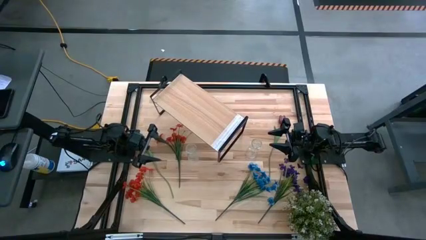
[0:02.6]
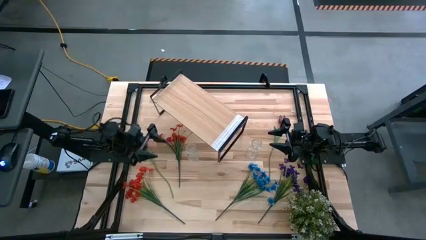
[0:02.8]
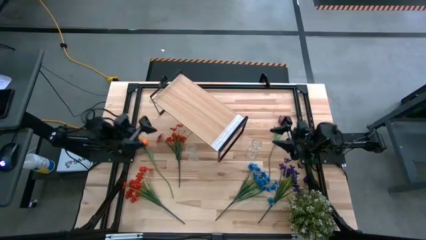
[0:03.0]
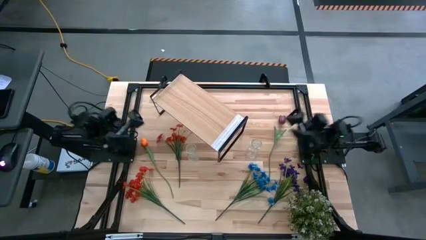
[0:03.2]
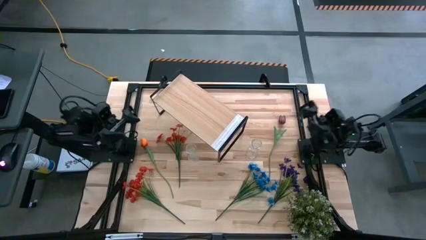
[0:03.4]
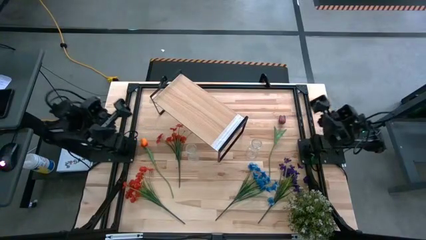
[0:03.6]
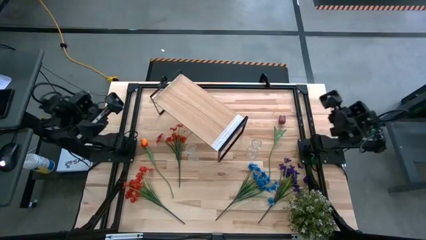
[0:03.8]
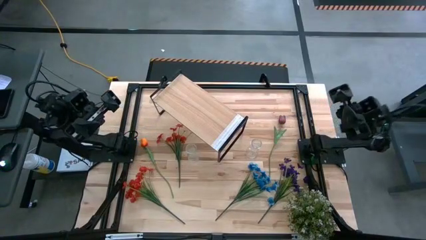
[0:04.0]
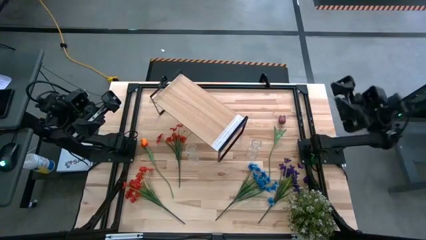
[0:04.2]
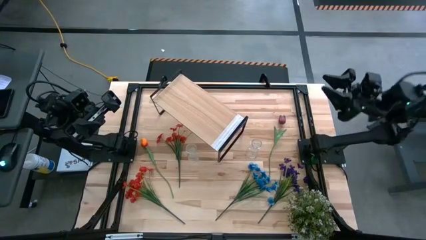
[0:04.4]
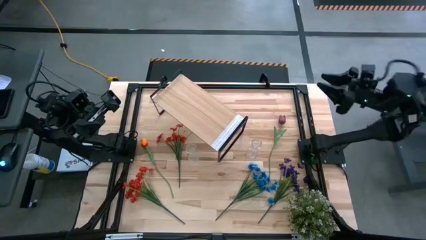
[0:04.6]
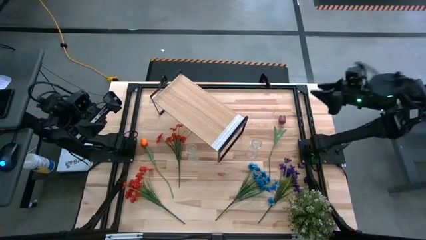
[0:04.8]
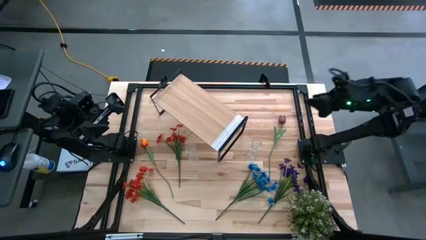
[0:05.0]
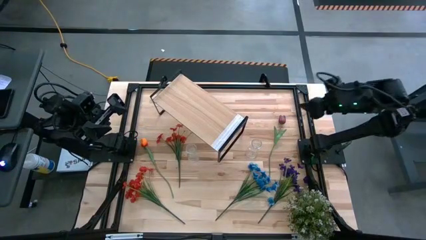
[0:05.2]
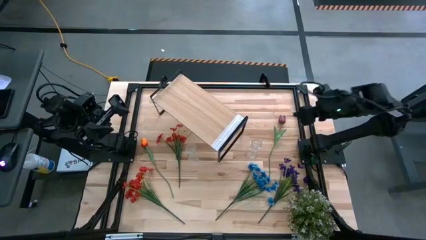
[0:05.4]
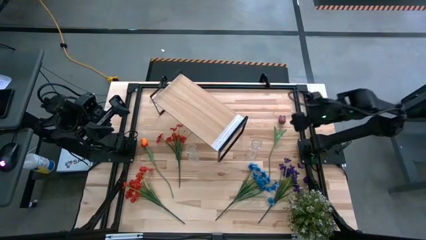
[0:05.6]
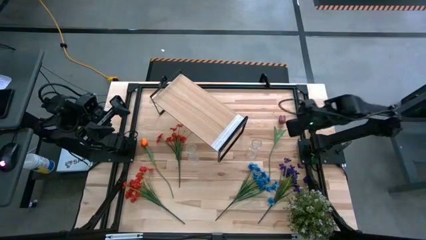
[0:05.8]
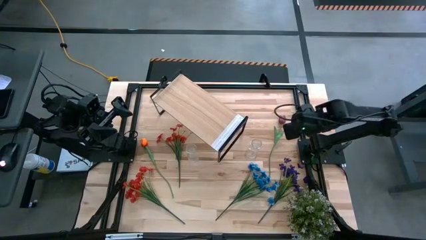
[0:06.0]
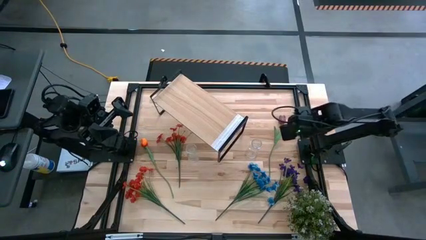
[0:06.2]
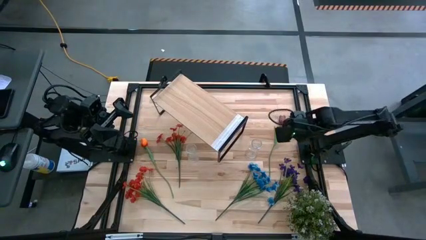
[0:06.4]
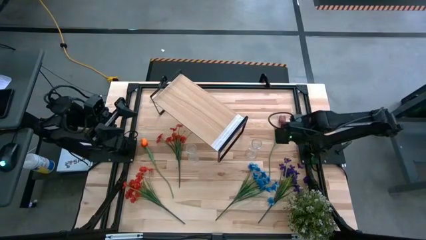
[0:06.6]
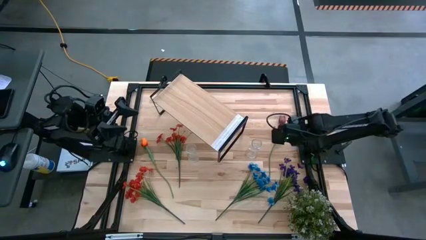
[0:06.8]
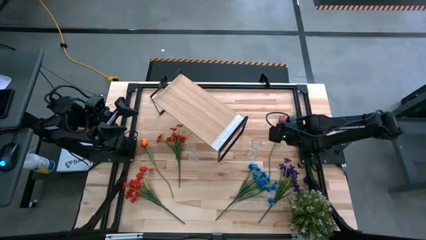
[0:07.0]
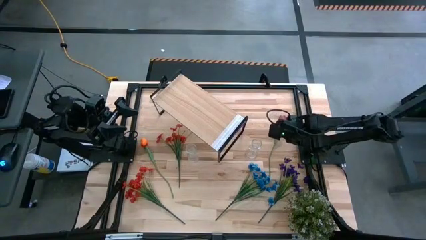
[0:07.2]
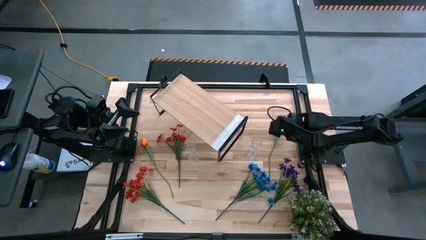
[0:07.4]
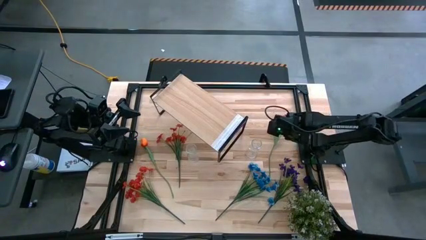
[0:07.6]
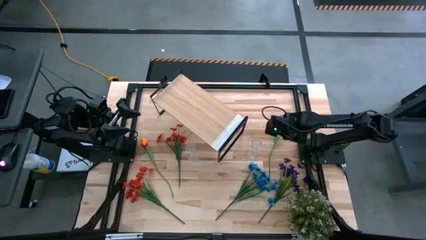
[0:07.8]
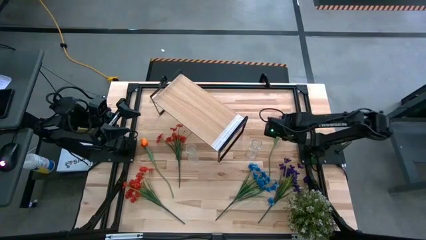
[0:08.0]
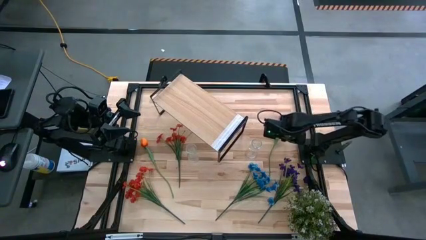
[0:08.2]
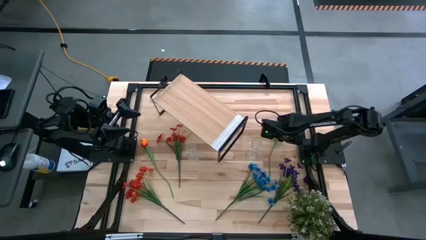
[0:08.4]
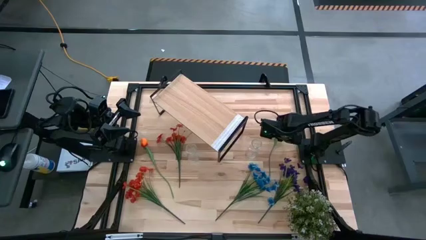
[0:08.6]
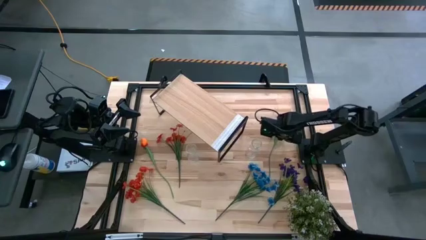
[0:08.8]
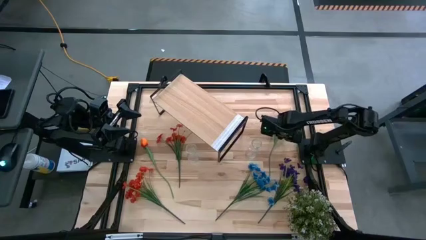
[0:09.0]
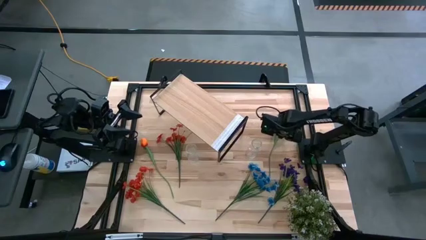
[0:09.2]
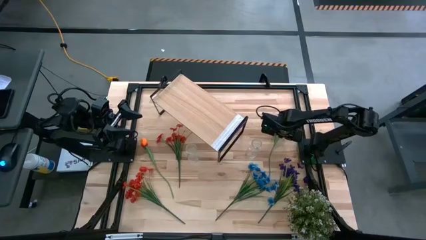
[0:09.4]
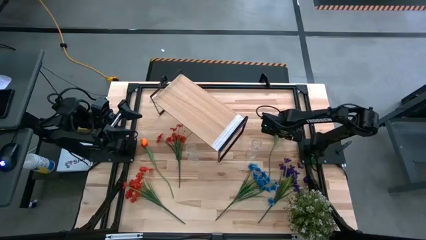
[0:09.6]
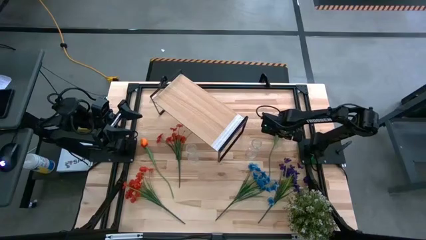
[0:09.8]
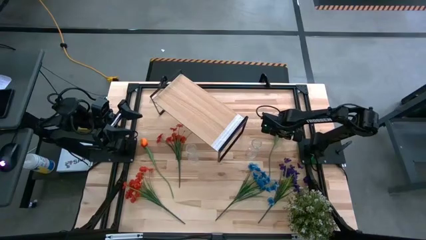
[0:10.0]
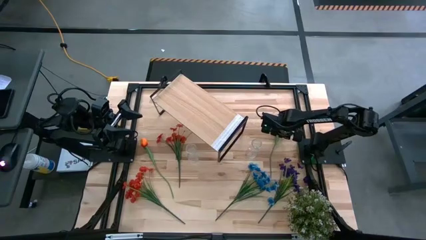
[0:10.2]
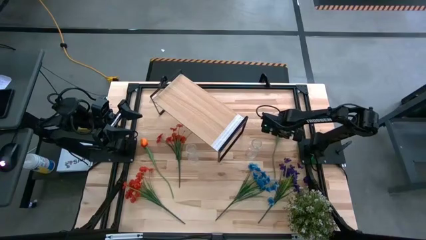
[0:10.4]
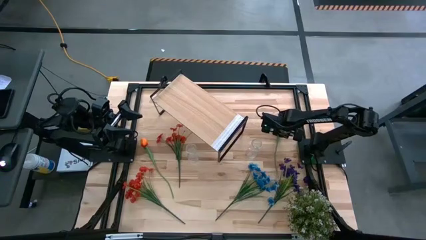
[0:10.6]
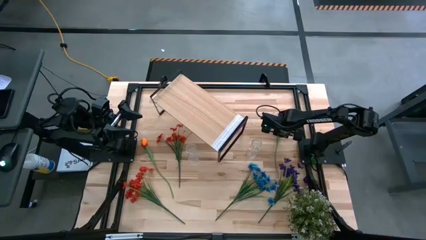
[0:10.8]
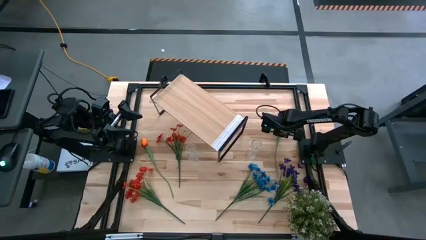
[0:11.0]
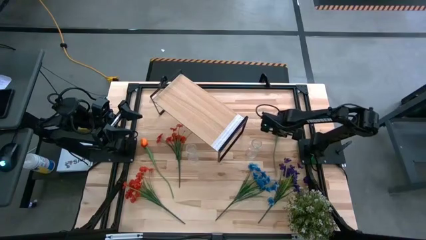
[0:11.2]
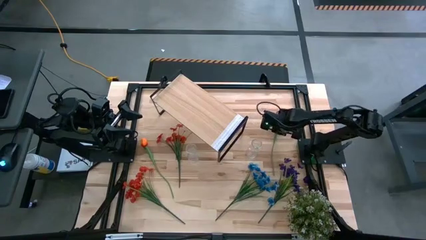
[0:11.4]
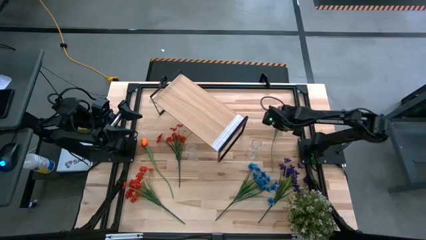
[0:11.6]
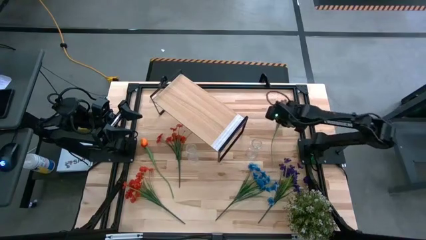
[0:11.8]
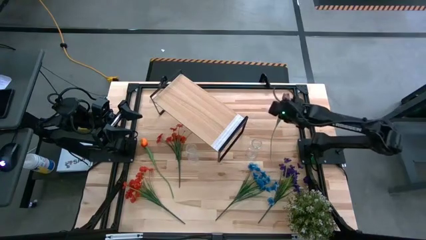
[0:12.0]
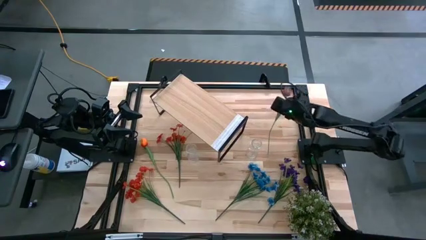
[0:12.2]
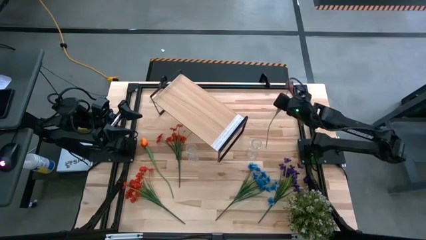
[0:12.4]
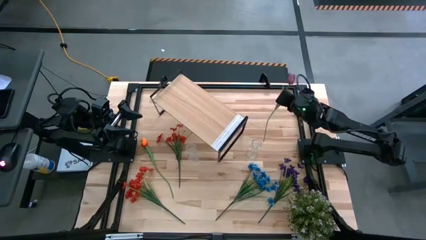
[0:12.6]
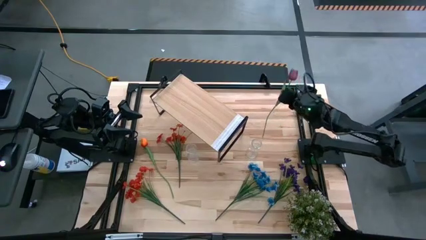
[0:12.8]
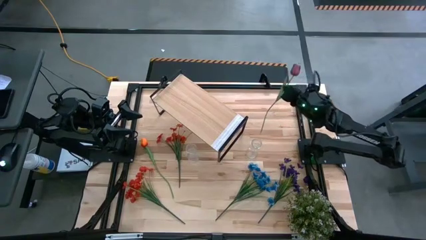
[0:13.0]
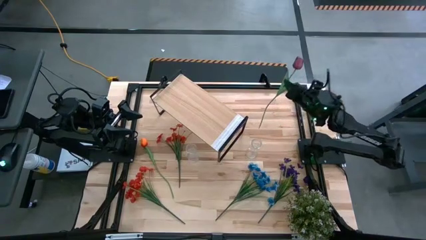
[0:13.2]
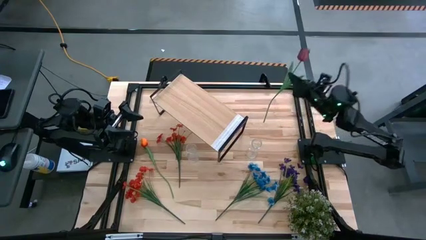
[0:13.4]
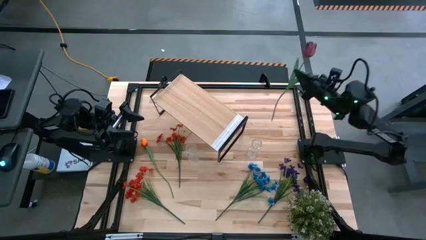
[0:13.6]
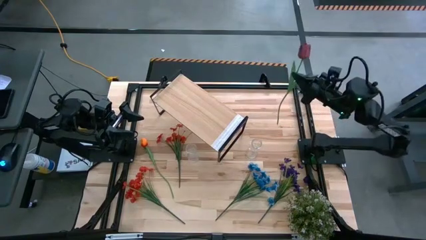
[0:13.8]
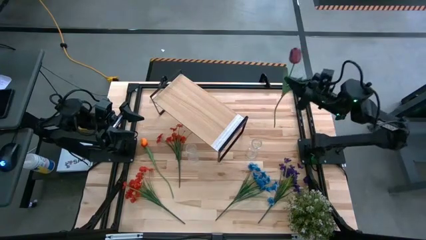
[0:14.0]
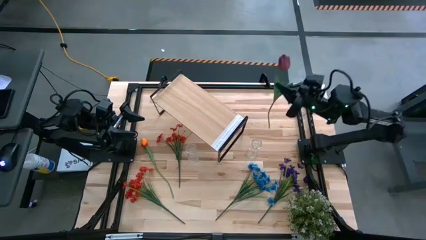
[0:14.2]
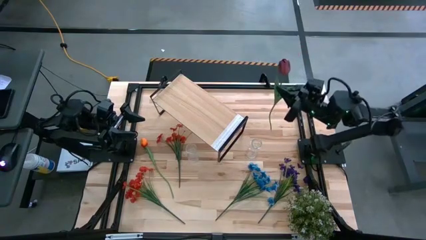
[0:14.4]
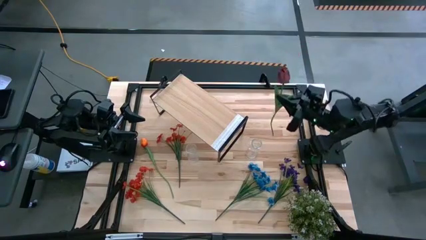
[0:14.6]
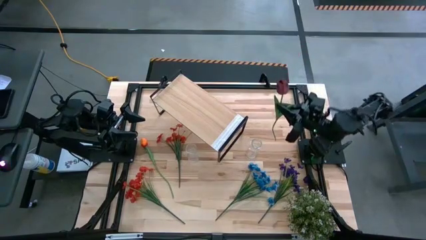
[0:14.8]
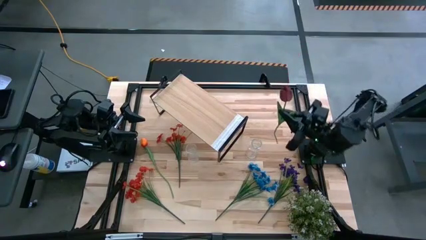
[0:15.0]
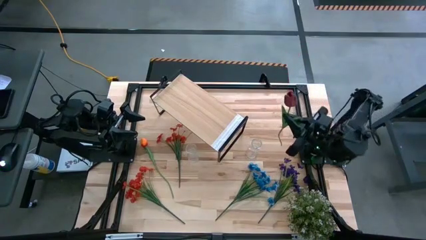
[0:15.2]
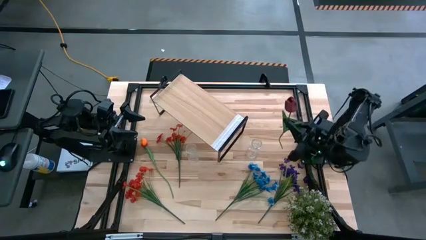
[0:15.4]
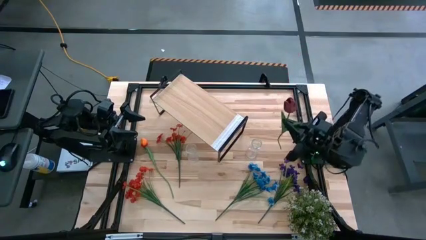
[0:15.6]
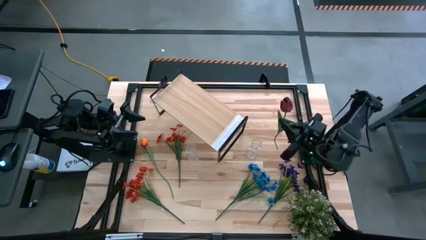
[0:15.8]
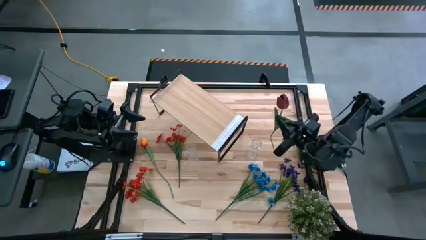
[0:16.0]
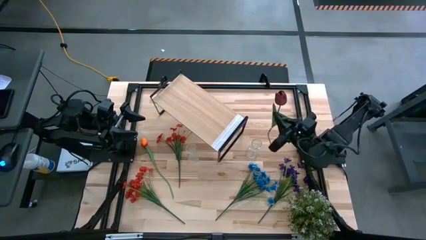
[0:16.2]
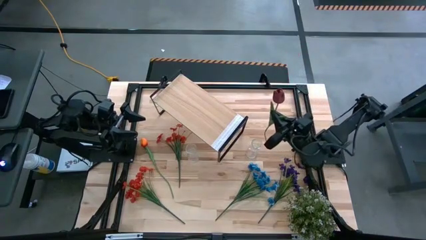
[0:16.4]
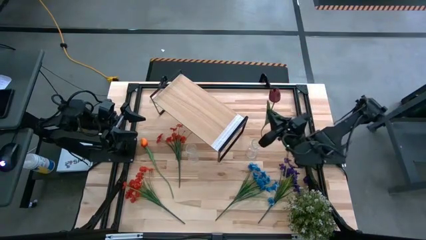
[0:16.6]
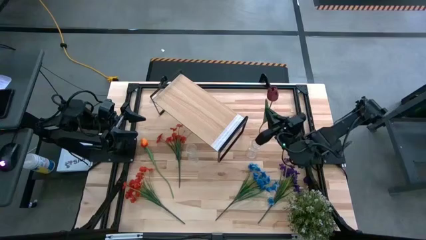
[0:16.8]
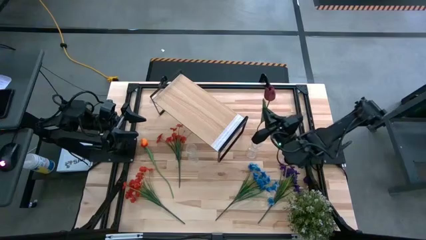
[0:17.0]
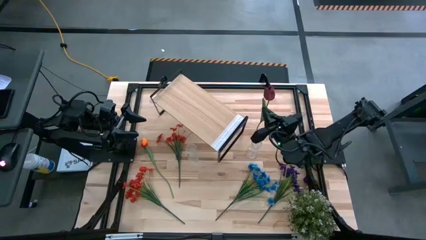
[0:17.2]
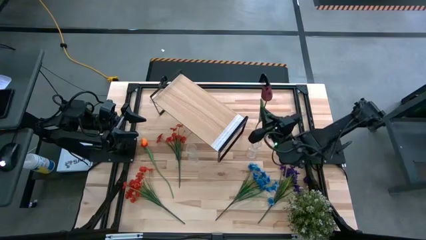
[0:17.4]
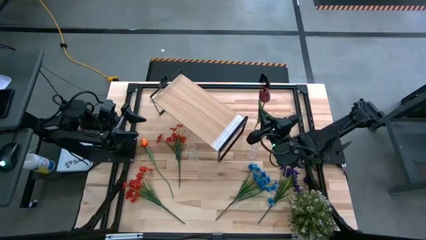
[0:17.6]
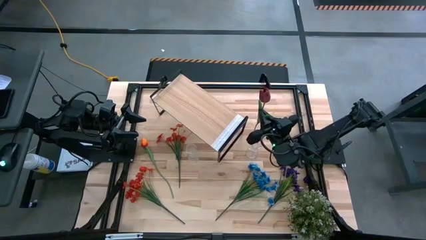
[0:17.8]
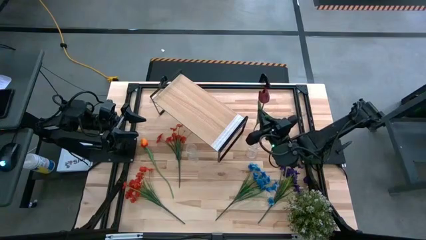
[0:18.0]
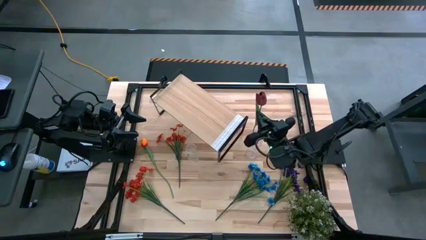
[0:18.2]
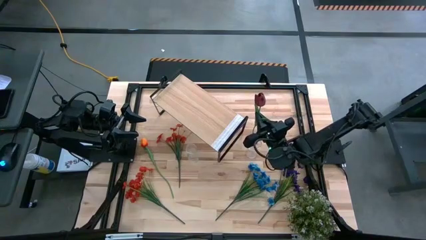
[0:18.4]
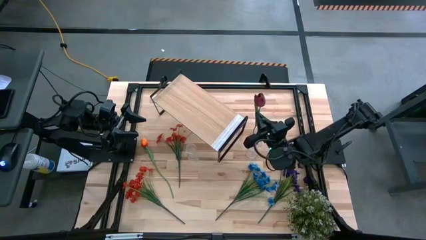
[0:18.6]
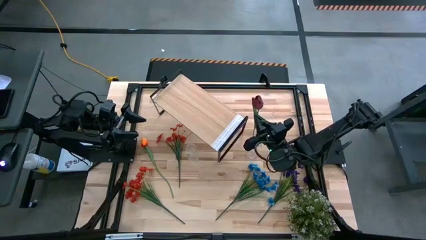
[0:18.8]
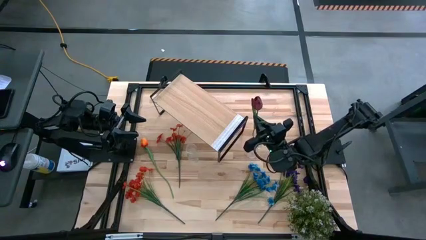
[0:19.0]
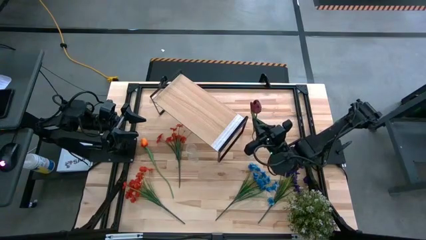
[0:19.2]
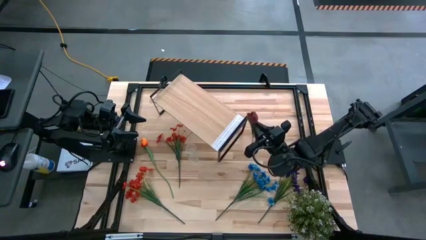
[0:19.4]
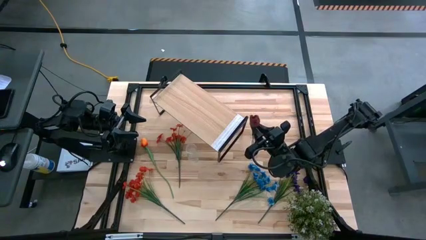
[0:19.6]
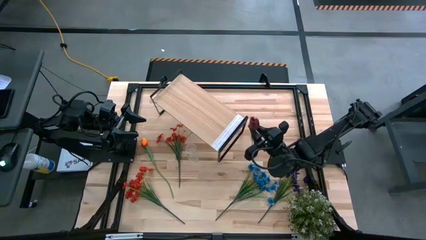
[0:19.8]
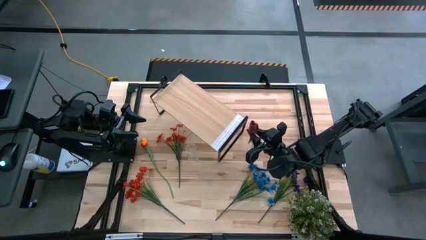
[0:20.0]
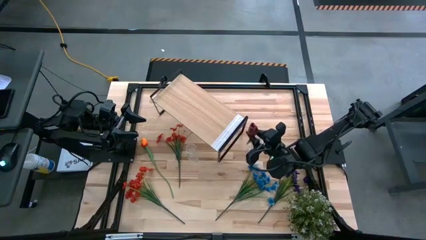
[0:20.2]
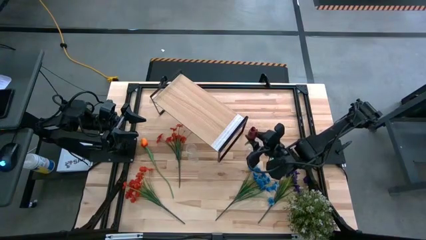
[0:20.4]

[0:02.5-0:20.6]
Task: Pick and place flowers into a vace then onto a shelf
Put the red tulip into the right transparent flower vase
